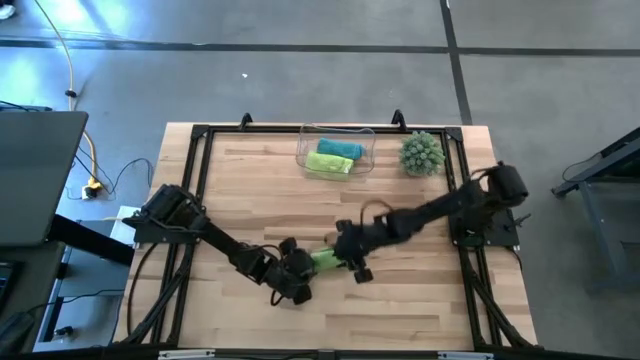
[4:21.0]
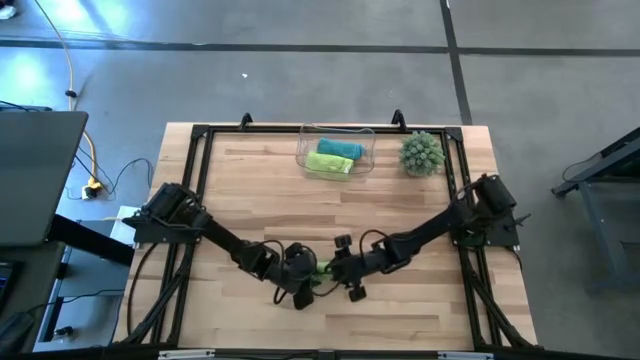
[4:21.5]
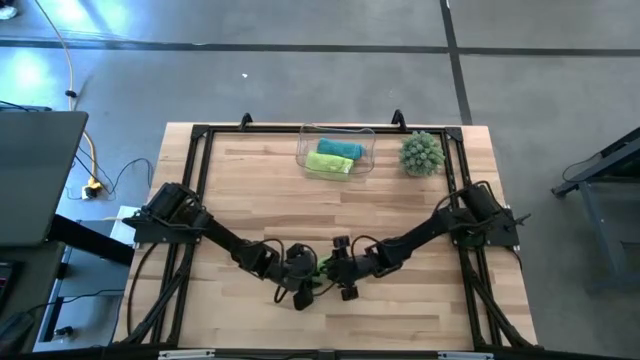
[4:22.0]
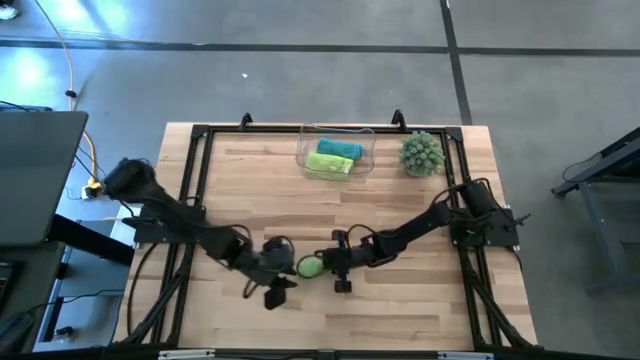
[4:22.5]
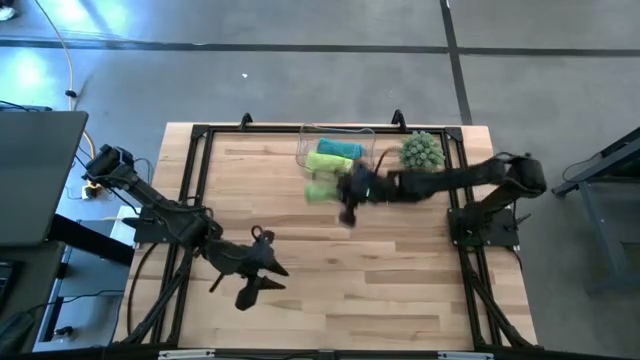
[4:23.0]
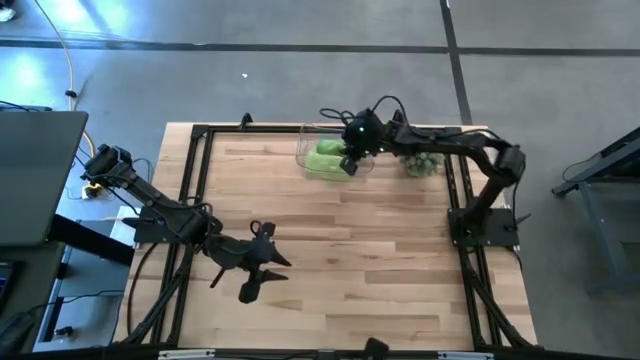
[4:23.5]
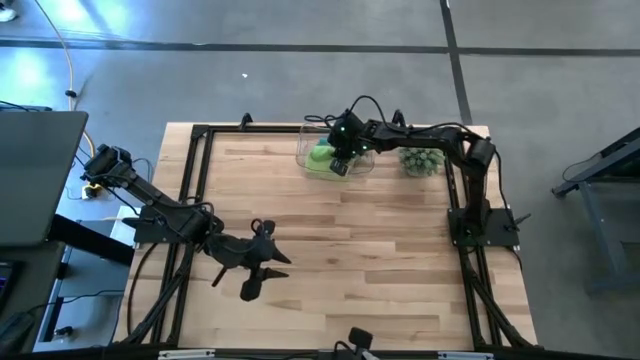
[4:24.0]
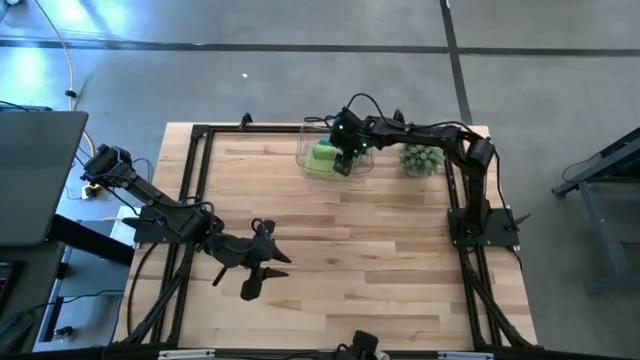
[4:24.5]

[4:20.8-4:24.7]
Task: Roll microfiber towels into tight, uniform cylinder then place into a basket
Put the green microfiber cloth into the transparent bin

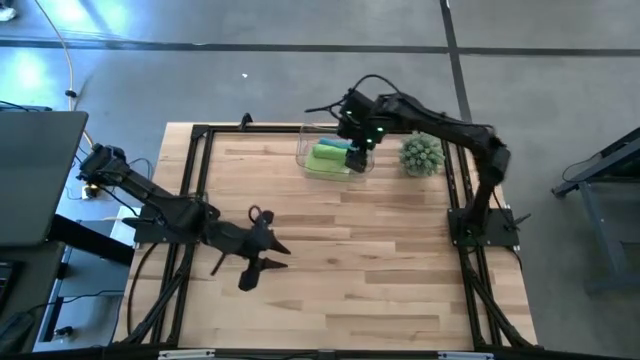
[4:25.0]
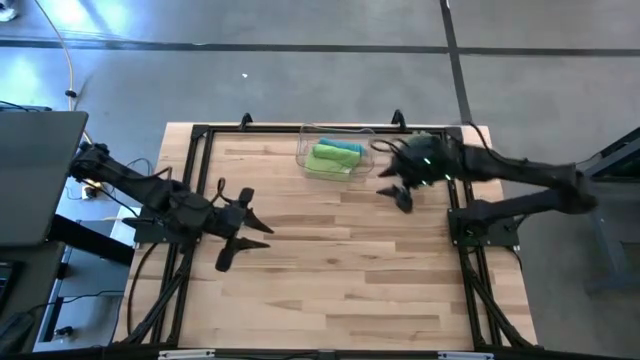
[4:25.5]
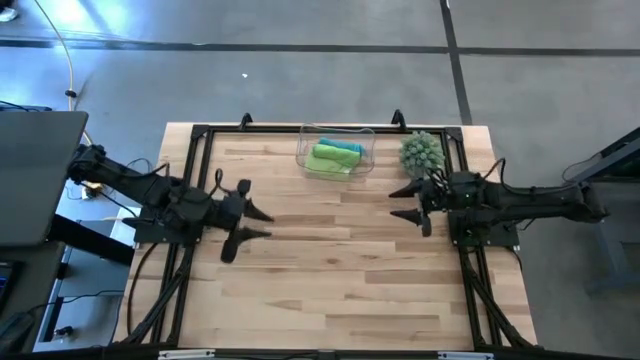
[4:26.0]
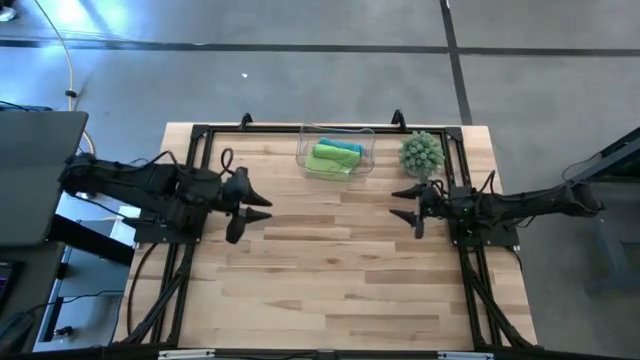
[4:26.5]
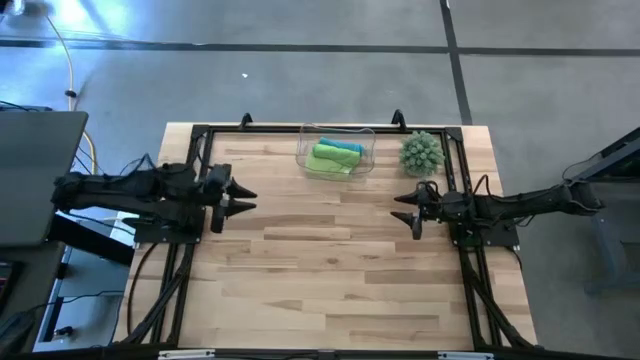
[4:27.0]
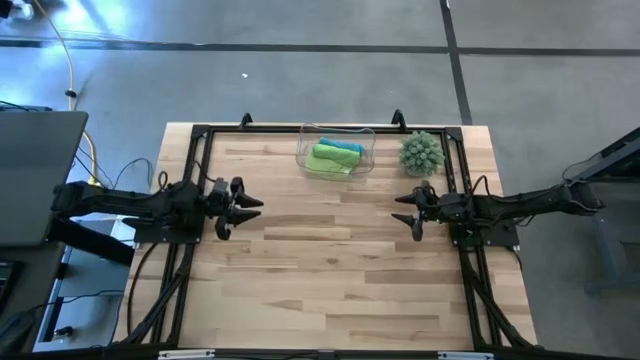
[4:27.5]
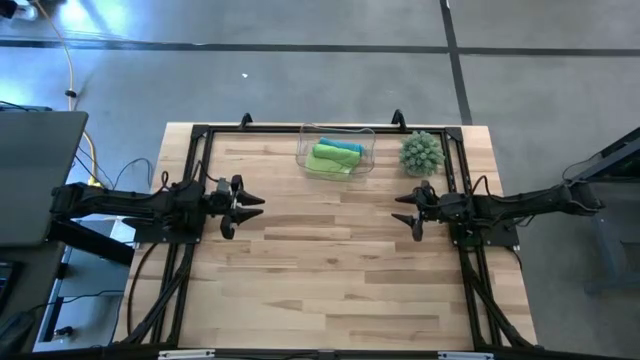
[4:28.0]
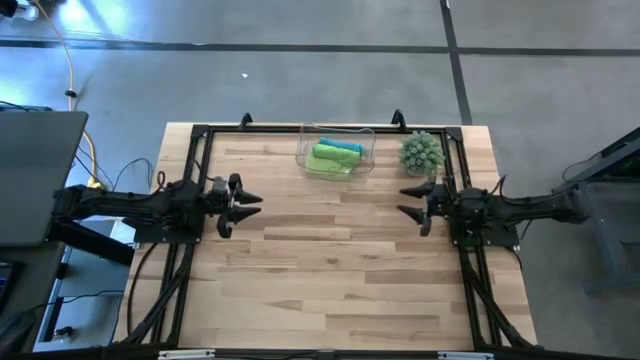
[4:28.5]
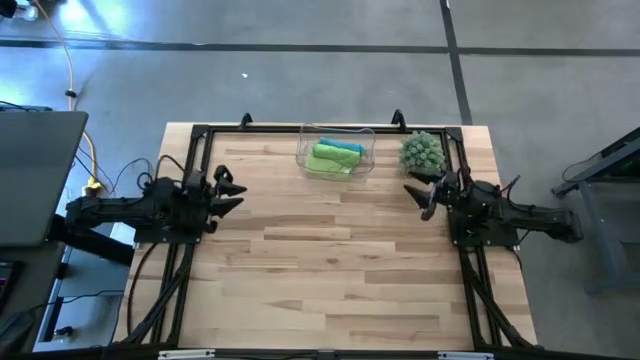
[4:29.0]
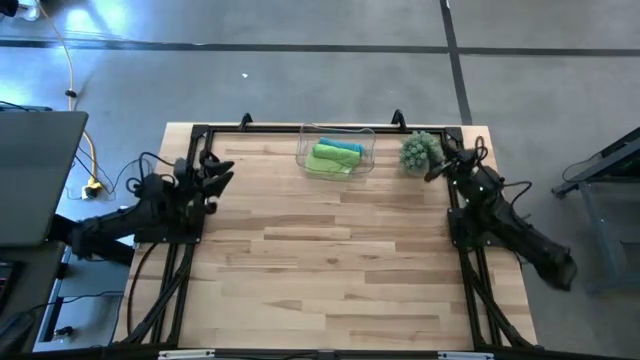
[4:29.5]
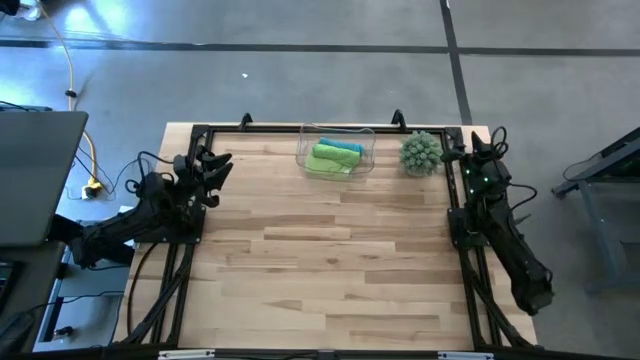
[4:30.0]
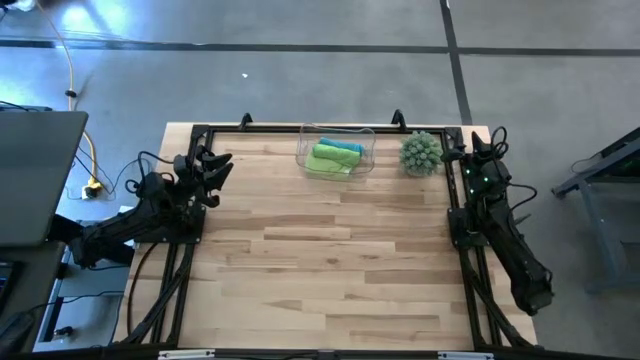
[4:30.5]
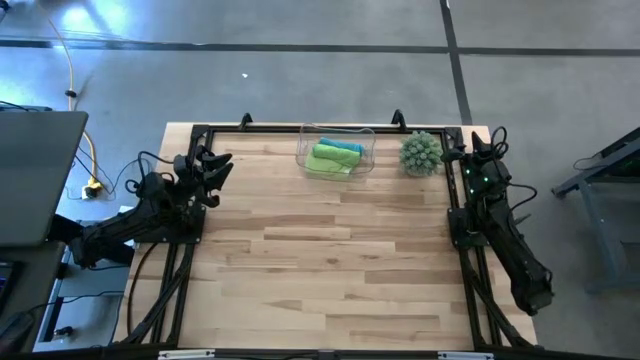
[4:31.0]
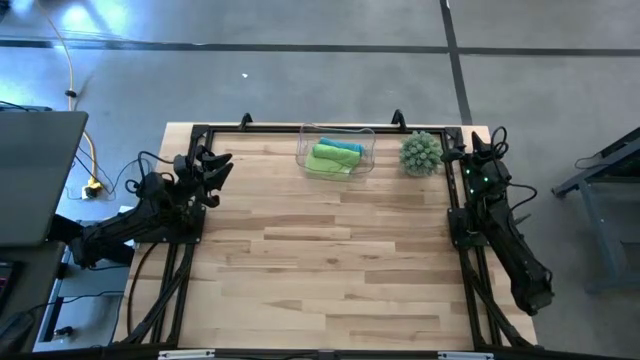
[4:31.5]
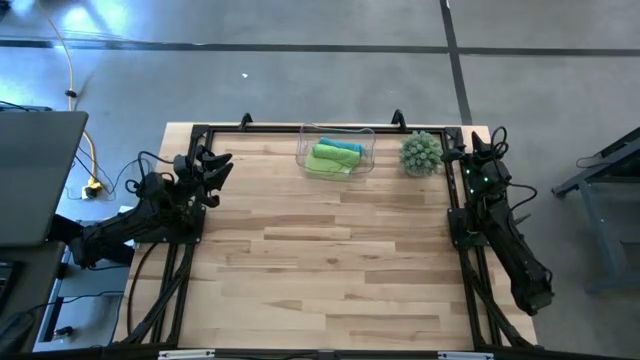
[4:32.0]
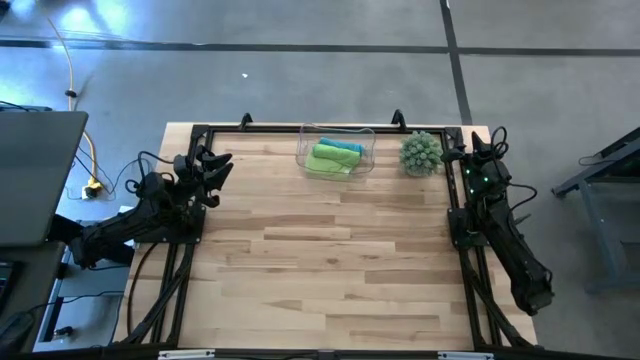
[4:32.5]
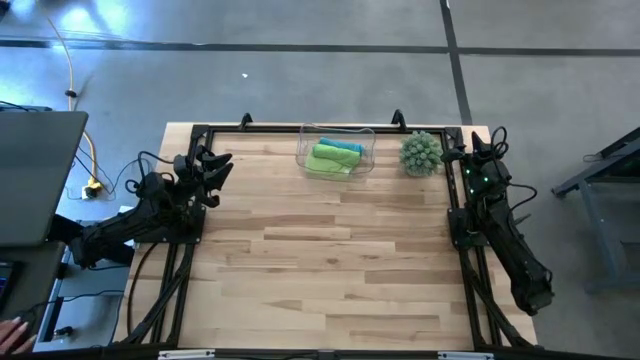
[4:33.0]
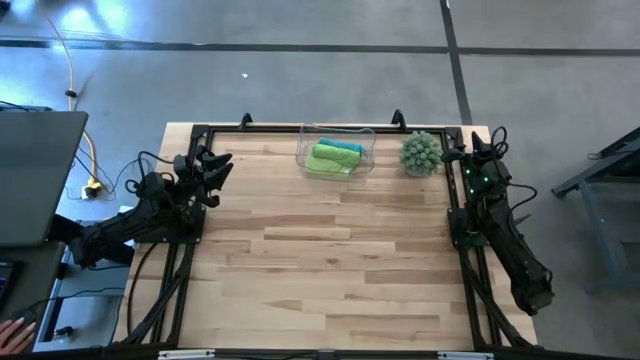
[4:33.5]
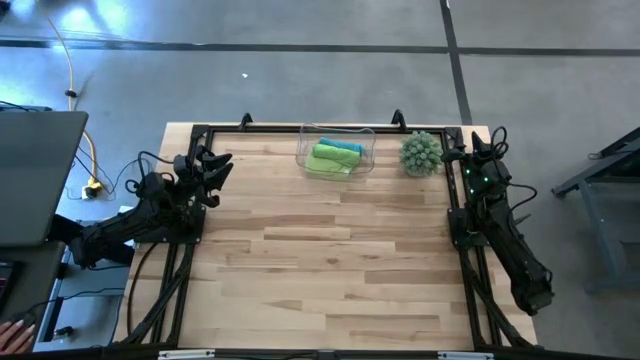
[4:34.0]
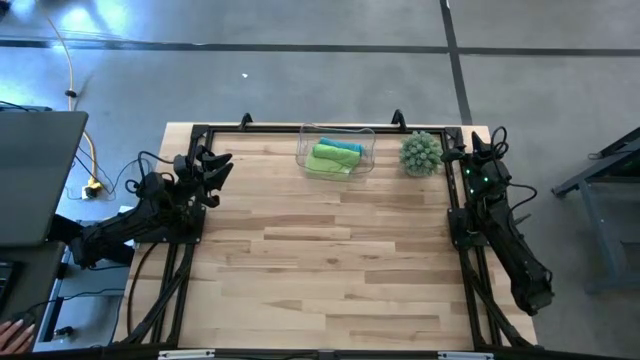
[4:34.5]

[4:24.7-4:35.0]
Return to Home Position

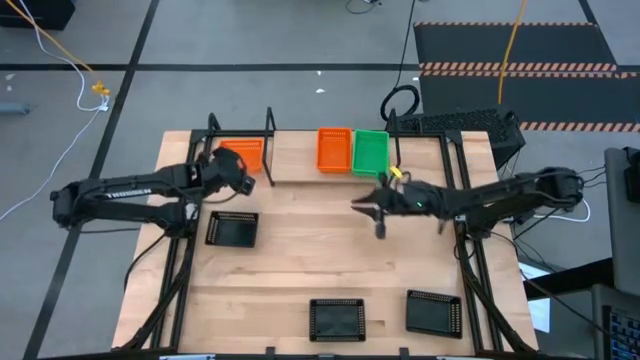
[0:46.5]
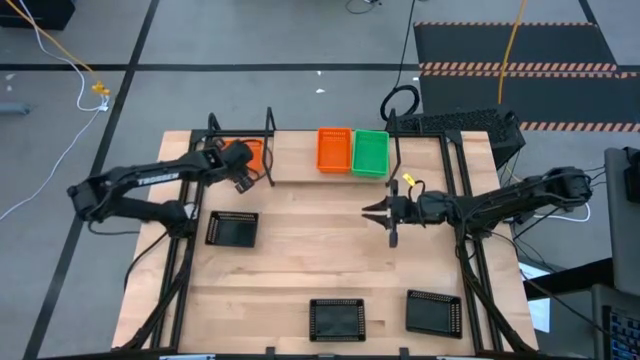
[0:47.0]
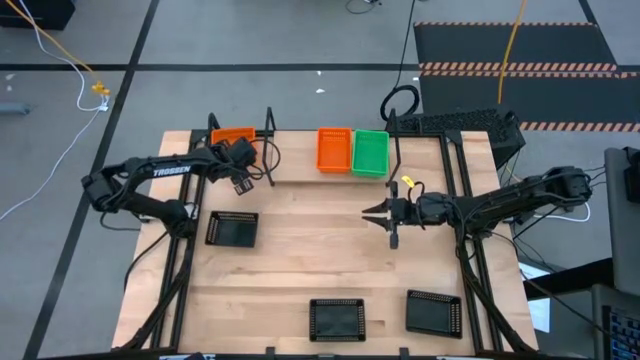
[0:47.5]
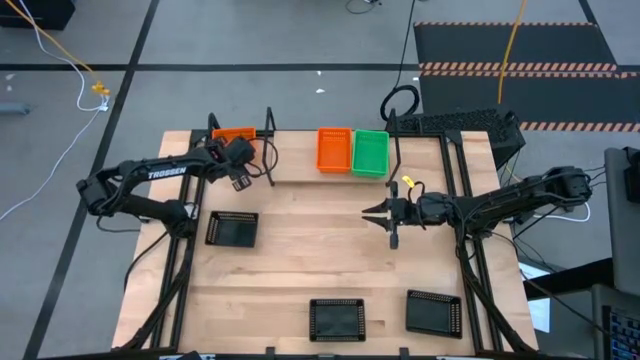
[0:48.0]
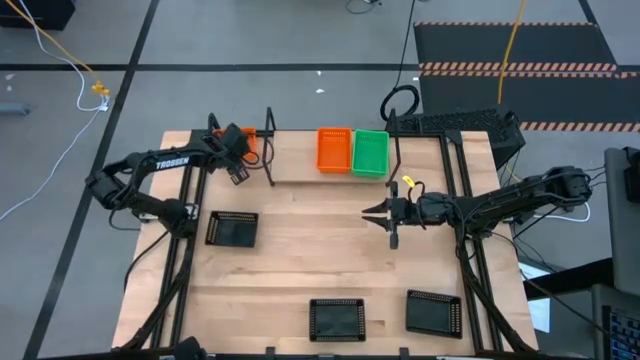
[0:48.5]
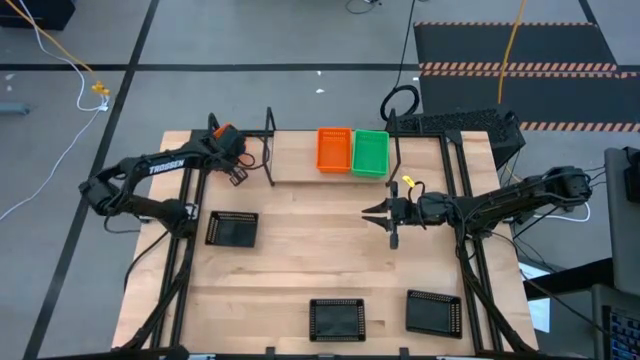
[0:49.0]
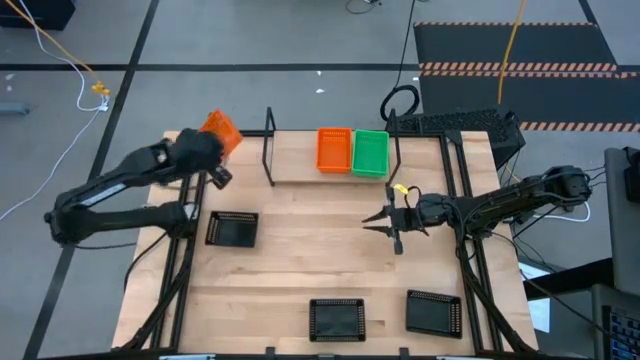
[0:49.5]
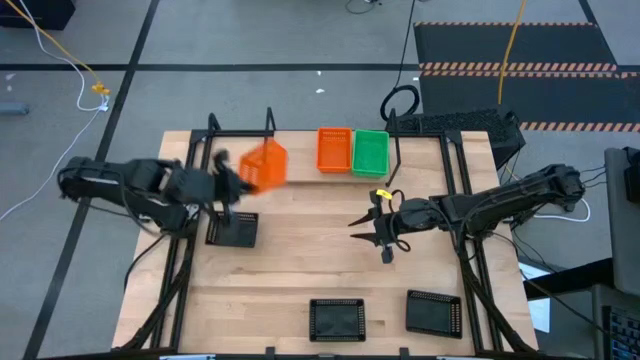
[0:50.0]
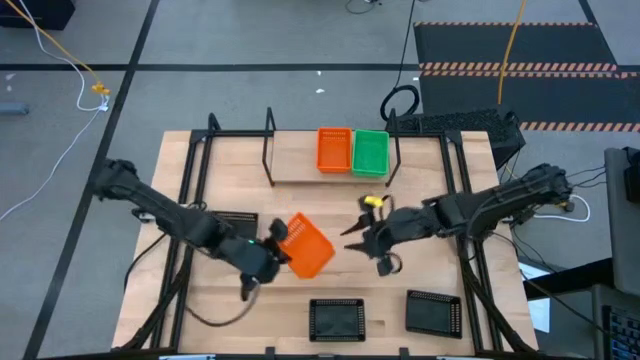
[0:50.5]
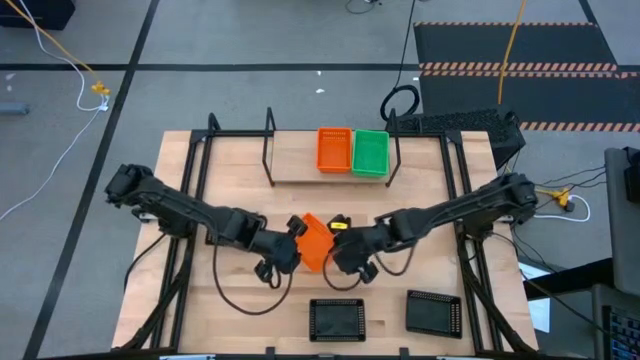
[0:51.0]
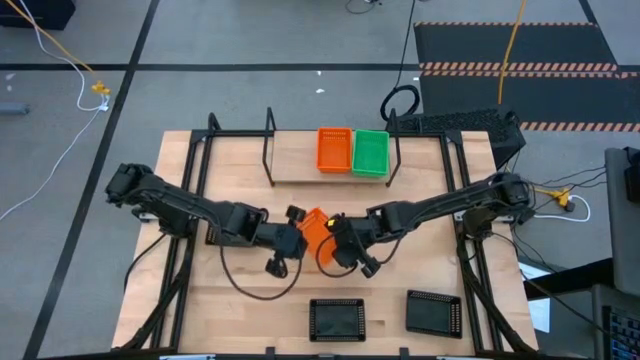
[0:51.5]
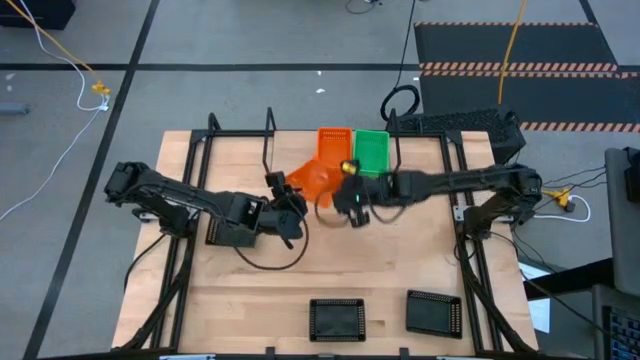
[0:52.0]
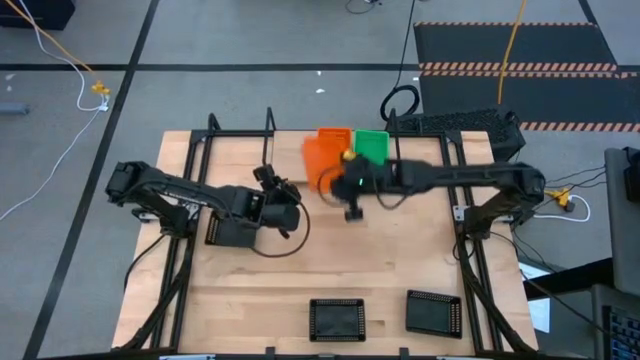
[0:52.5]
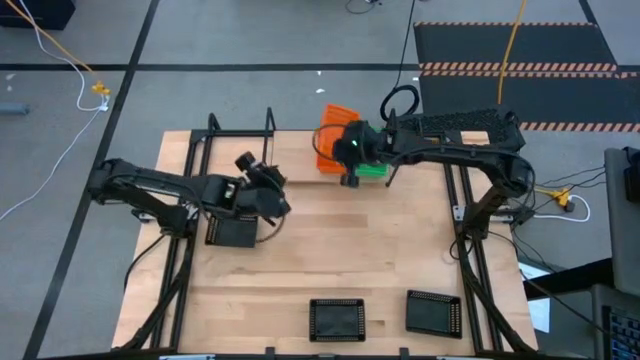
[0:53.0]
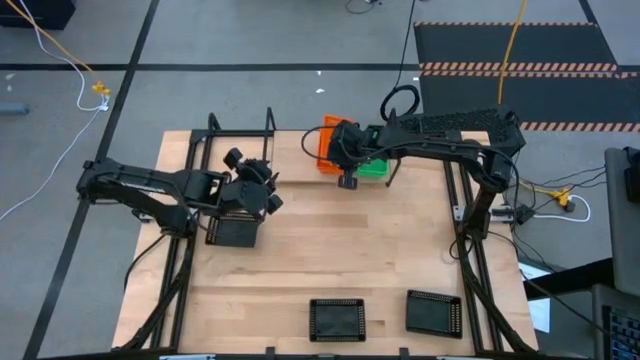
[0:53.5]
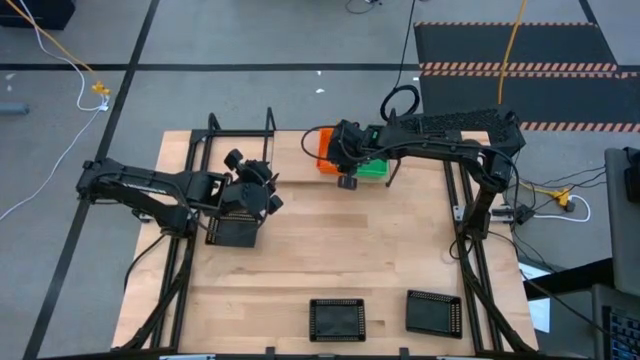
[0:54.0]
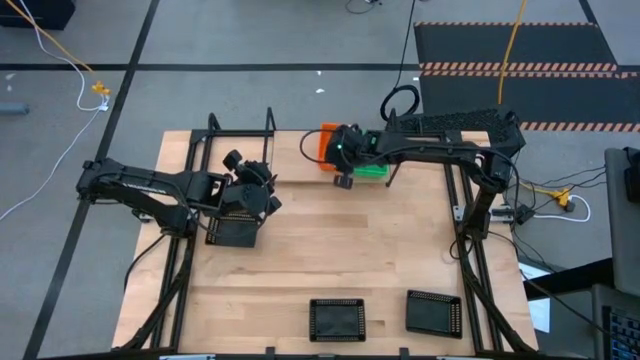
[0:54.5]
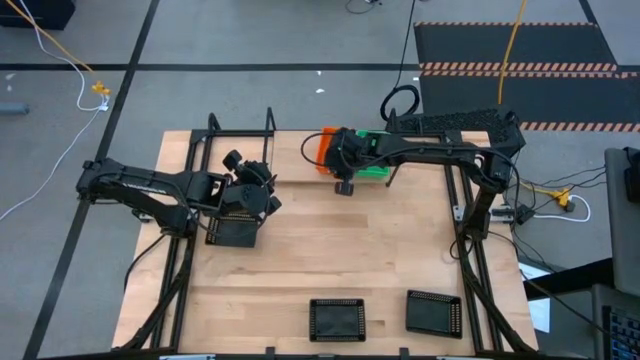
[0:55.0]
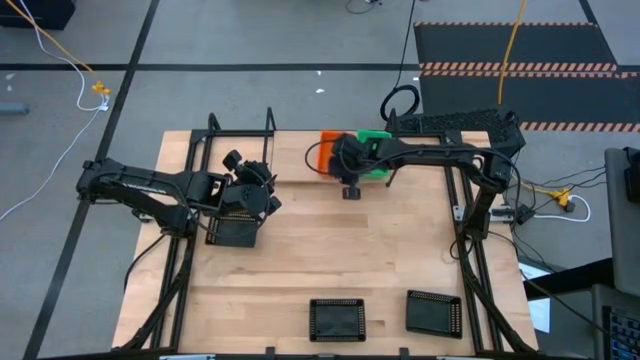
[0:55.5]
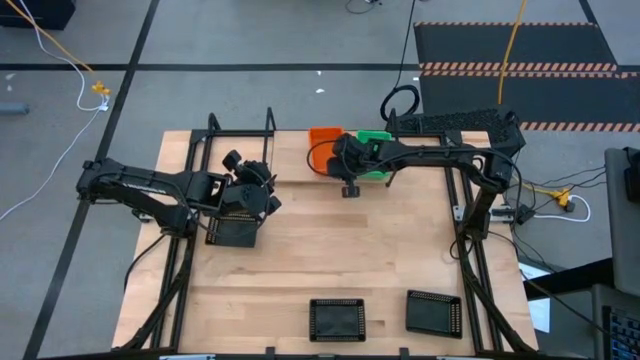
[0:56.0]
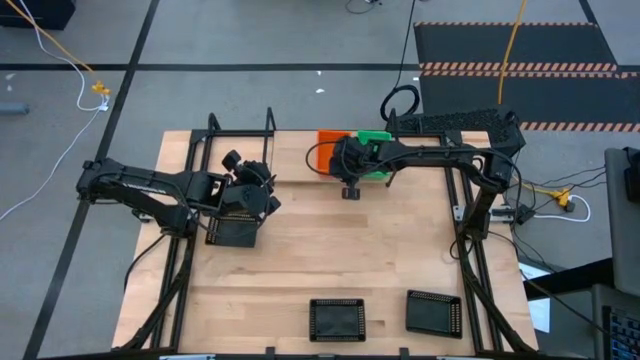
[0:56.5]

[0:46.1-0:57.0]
Task: Stack baskets on shelf by color
Stack the orange bin on top of the orange bin on the shelf
